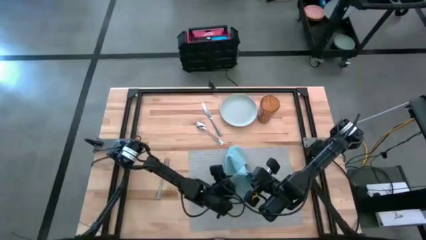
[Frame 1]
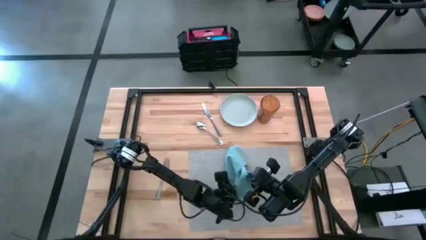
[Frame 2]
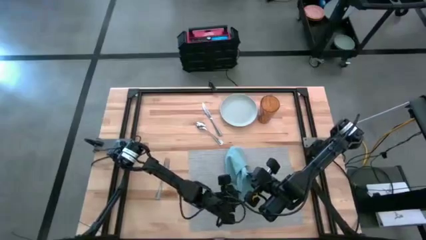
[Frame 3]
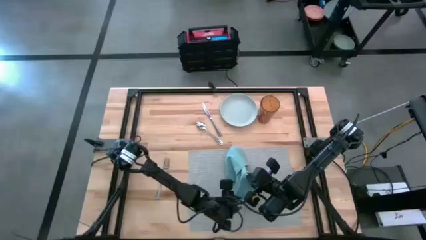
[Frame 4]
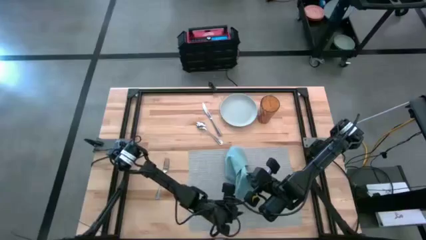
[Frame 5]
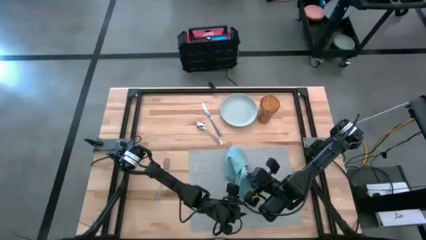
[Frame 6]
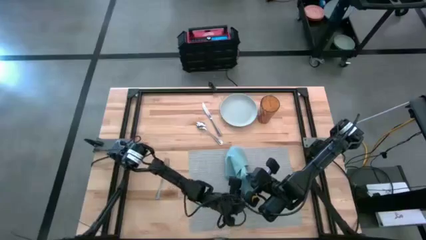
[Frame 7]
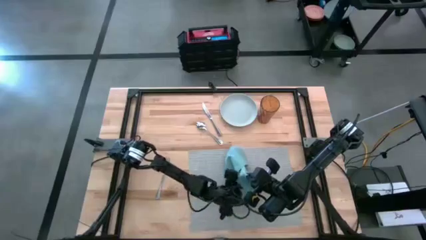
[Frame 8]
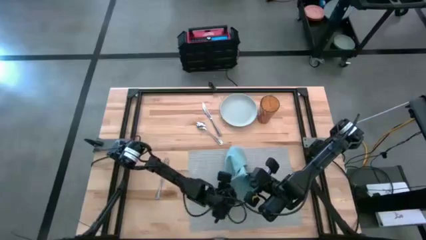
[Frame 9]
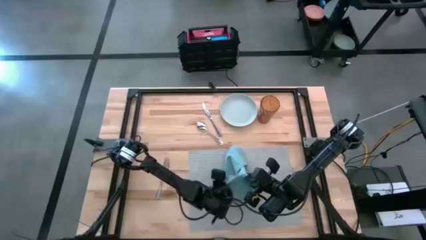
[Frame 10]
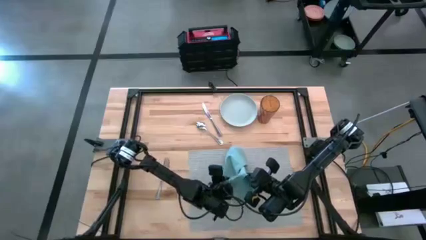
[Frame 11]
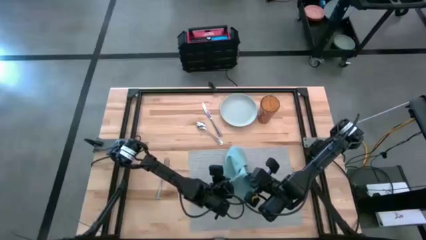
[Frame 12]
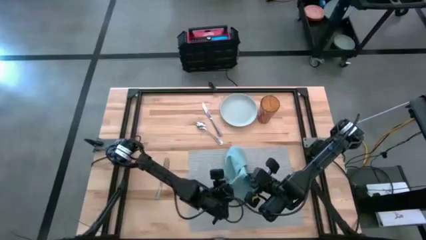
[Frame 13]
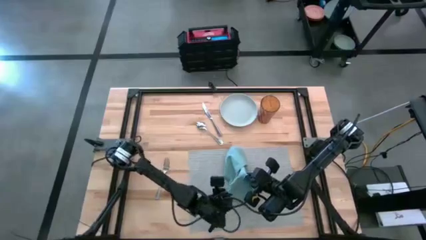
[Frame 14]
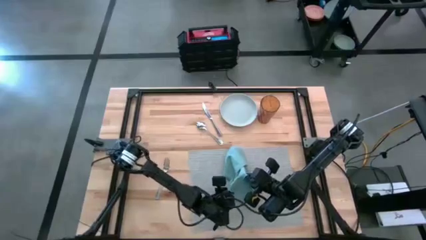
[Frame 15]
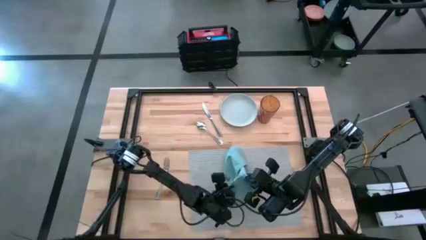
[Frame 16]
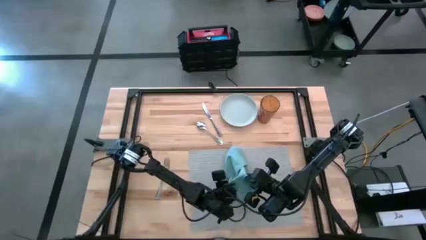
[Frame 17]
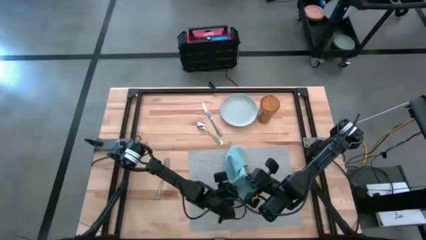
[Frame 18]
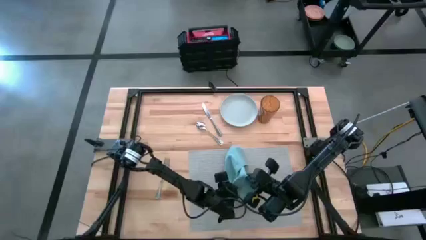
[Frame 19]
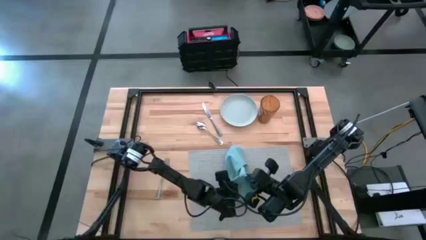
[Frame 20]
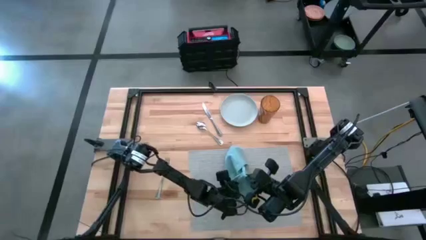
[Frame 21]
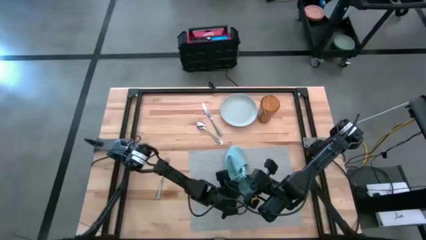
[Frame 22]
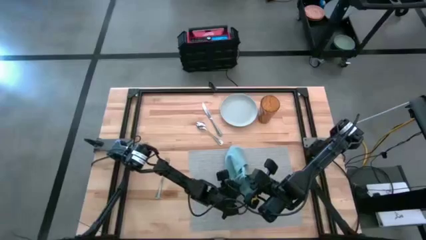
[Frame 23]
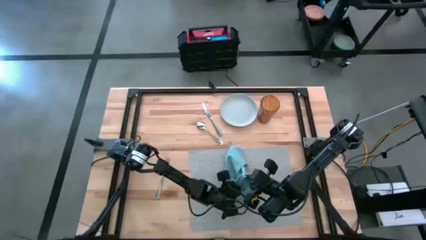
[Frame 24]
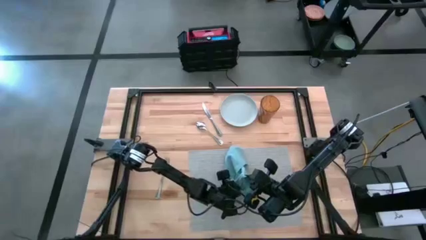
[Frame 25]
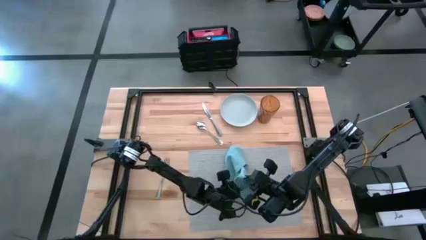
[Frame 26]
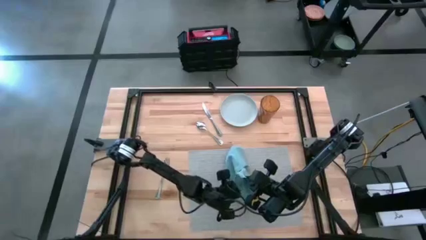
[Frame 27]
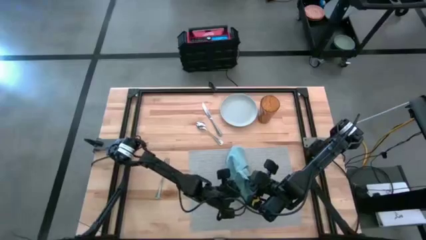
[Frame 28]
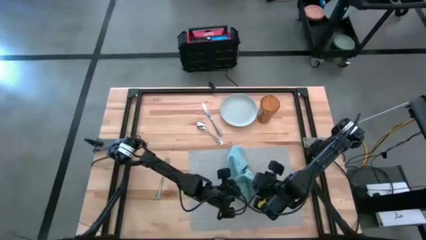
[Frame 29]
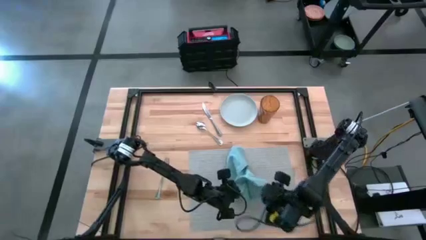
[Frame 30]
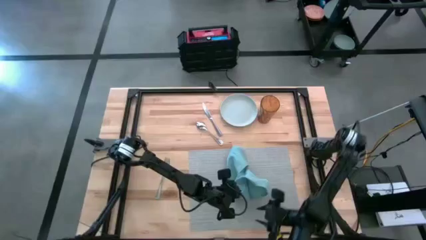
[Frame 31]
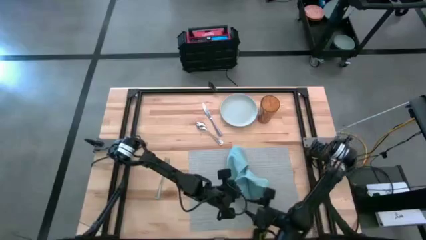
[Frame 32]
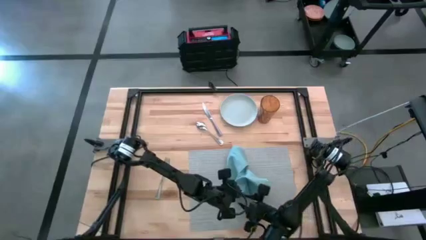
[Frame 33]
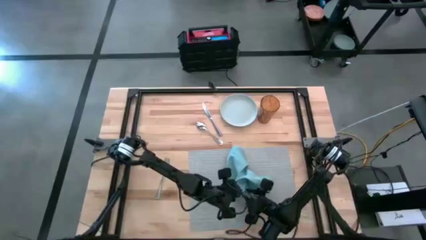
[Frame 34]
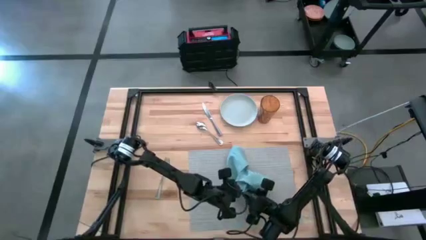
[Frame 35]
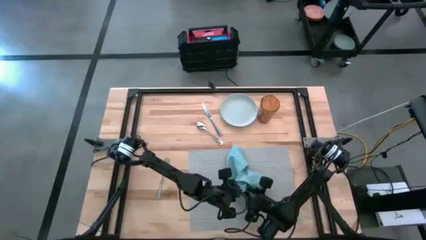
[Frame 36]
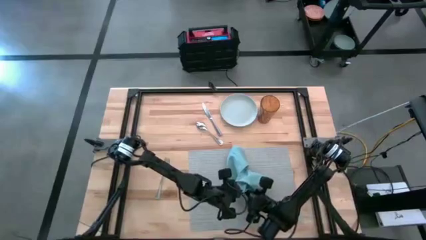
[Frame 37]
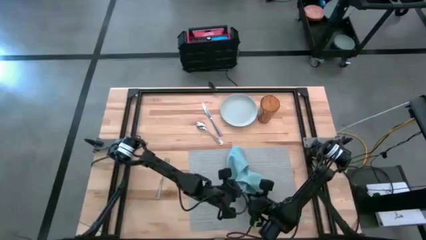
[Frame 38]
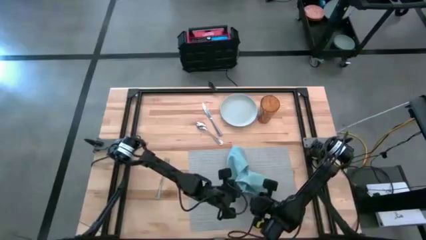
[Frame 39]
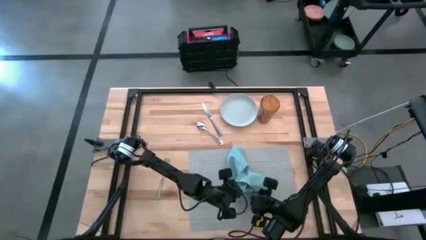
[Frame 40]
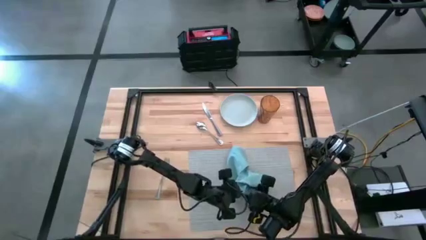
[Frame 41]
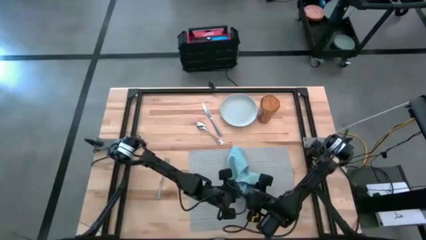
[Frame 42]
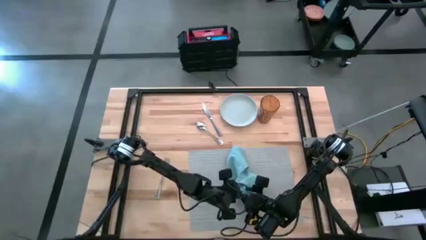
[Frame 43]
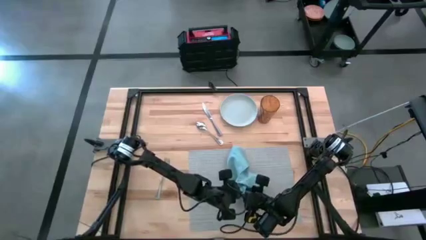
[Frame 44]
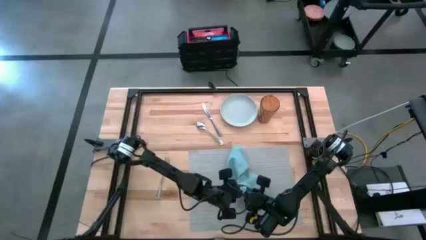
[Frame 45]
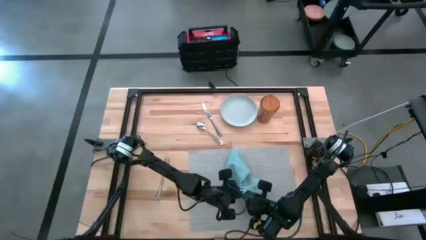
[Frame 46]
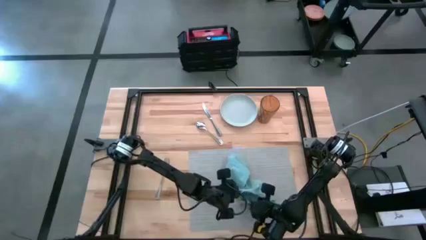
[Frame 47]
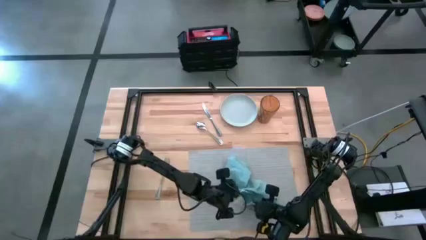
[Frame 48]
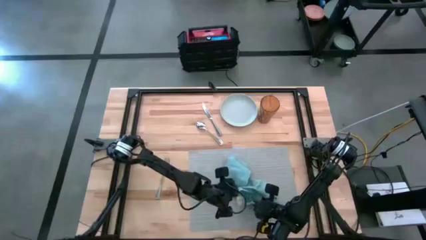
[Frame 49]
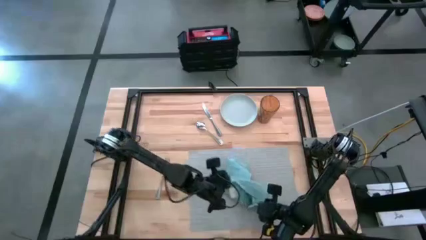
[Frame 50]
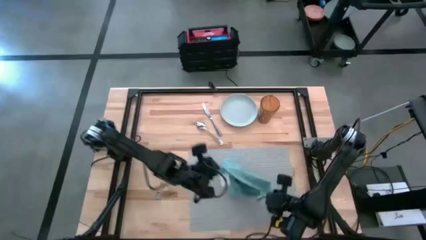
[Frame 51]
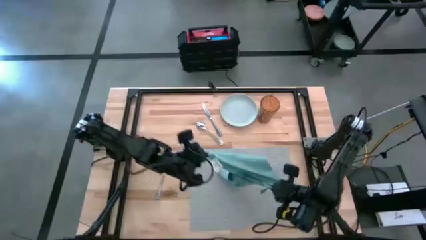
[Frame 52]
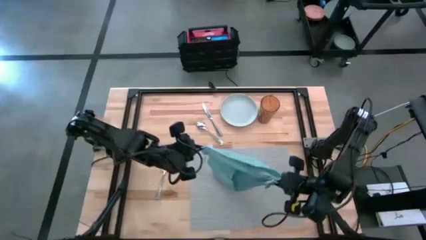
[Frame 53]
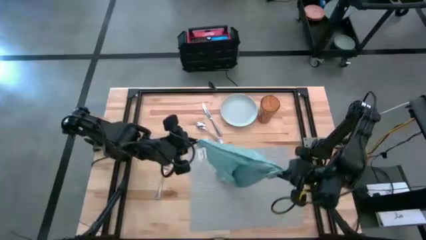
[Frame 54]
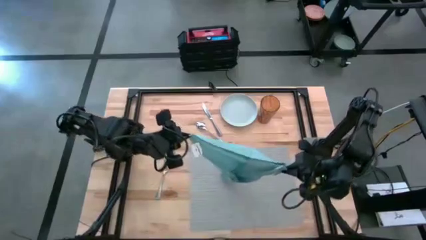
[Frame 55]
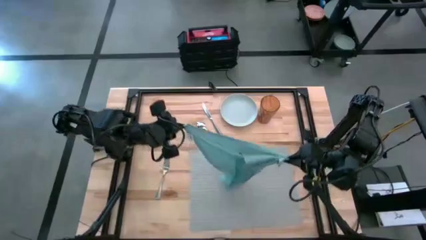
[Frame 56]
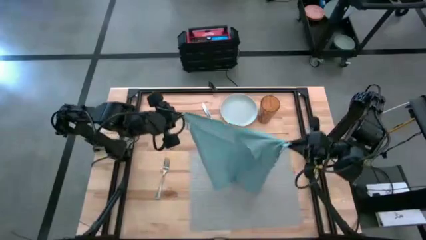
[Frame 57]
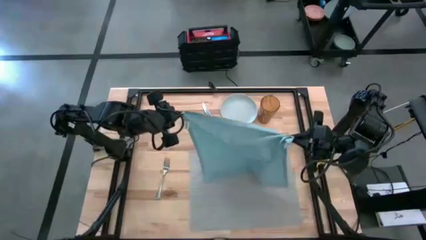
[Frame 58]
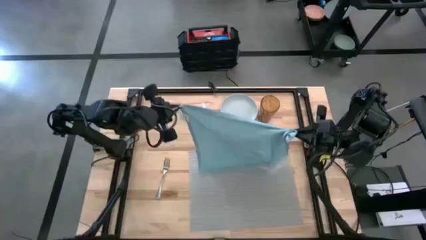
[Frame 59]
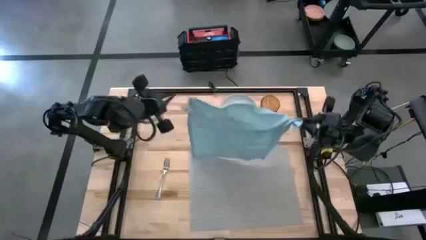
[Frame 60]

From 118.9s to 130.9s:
Task: Set table place
Fold the blue napkin on the gray placemat
